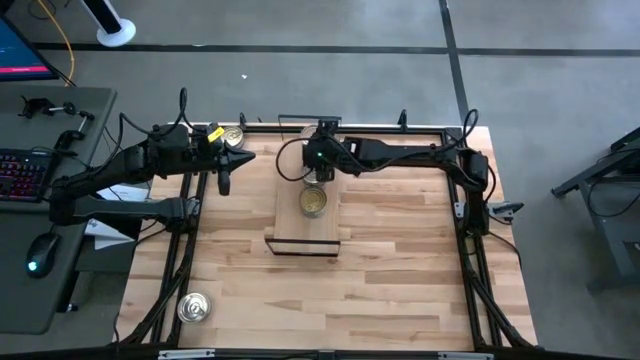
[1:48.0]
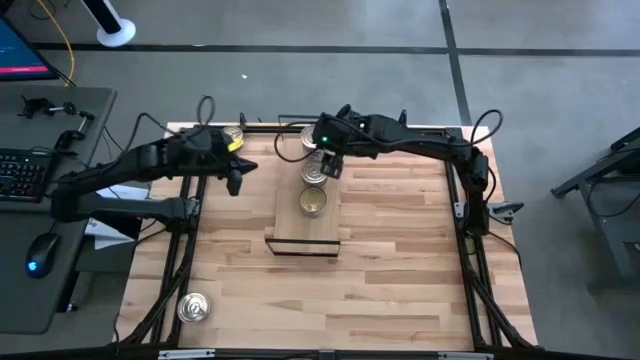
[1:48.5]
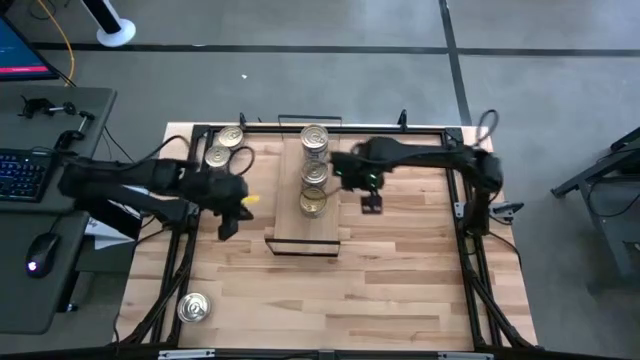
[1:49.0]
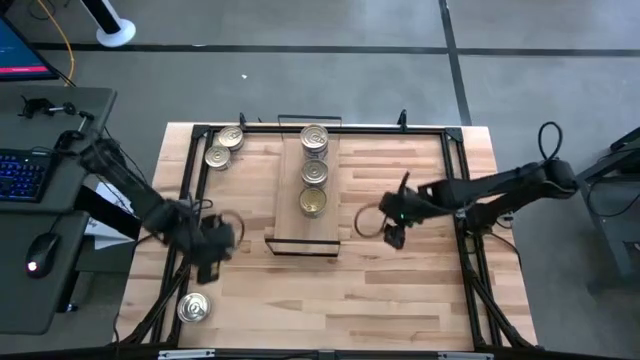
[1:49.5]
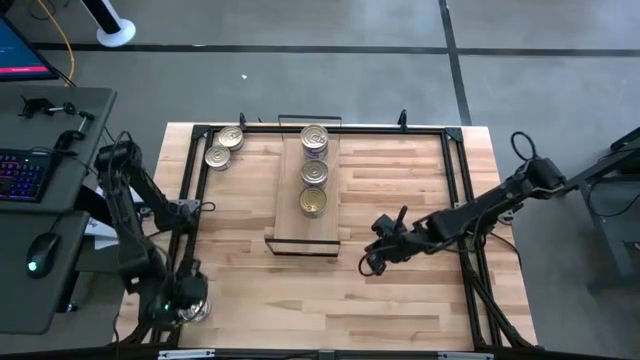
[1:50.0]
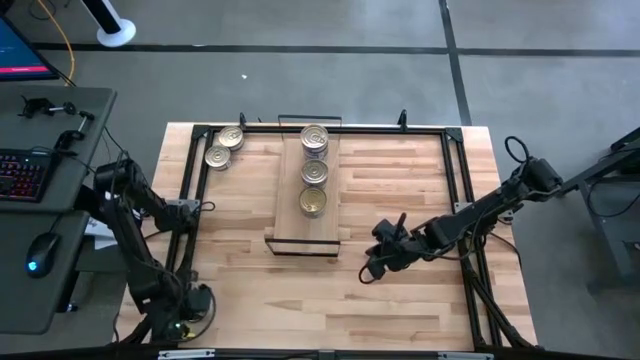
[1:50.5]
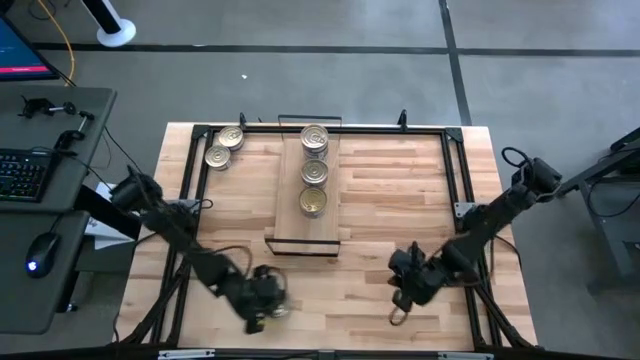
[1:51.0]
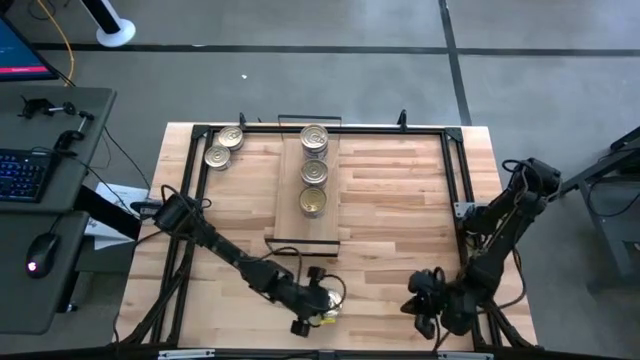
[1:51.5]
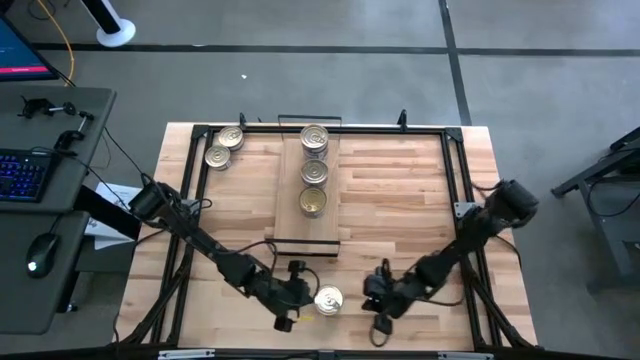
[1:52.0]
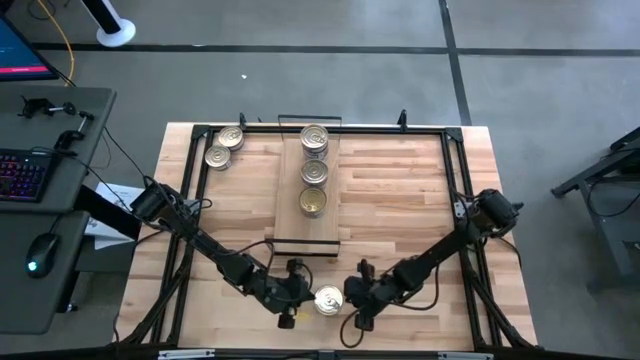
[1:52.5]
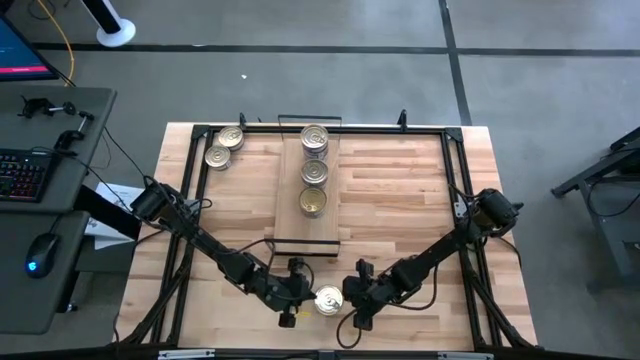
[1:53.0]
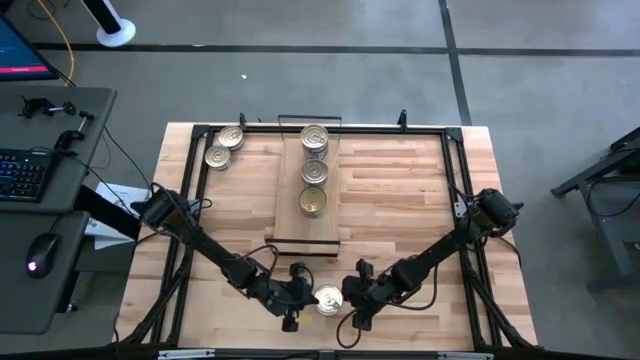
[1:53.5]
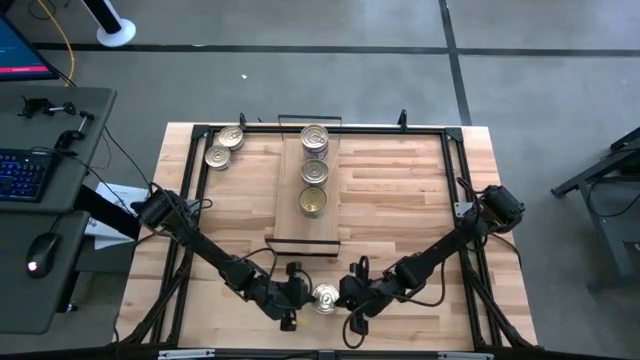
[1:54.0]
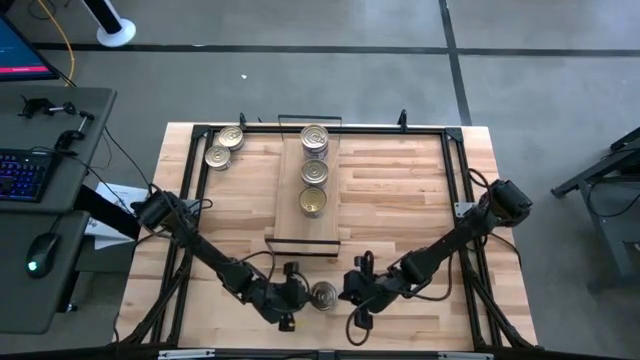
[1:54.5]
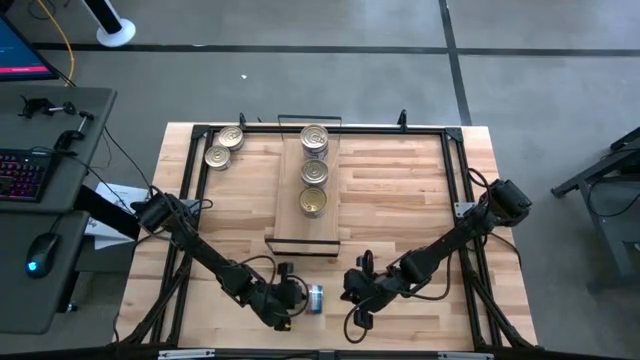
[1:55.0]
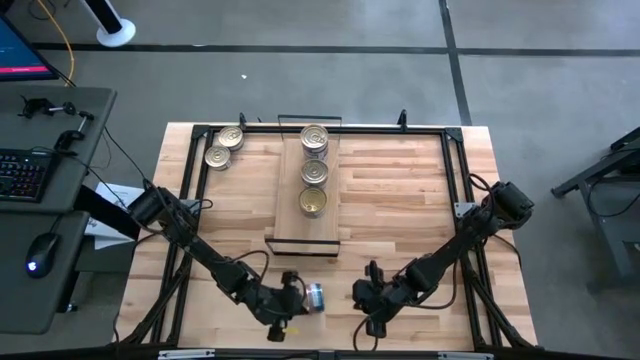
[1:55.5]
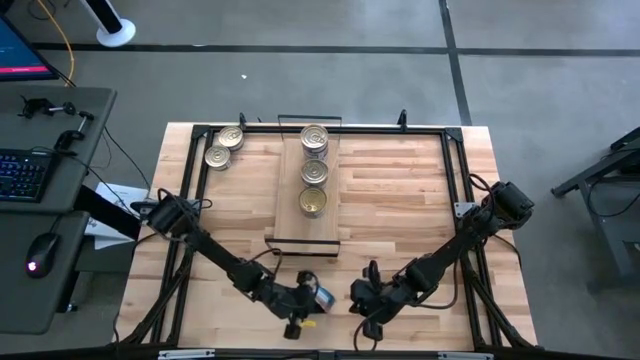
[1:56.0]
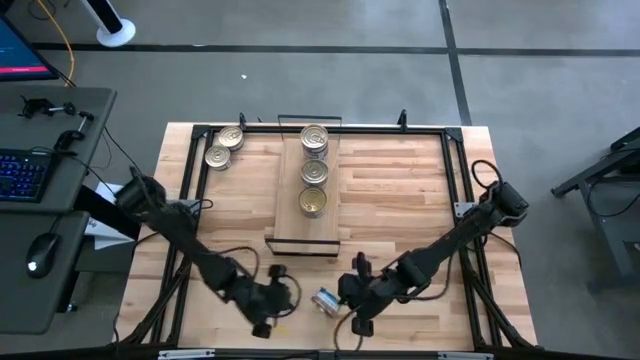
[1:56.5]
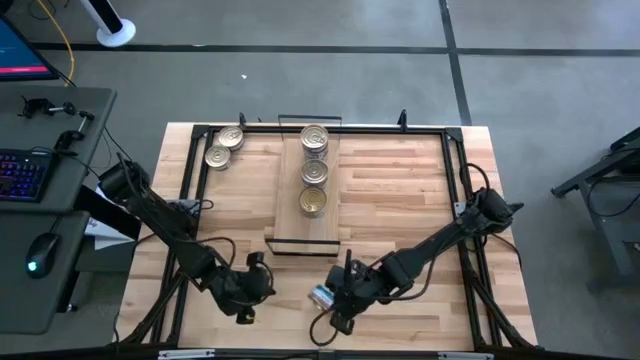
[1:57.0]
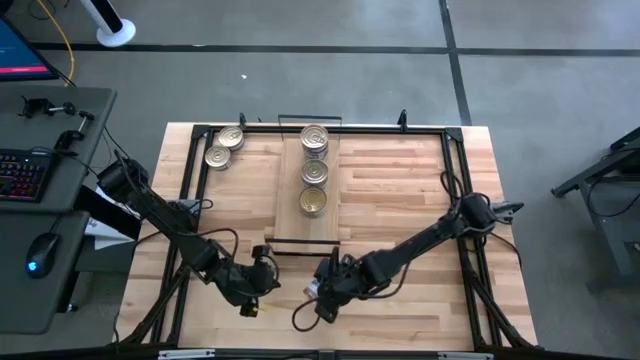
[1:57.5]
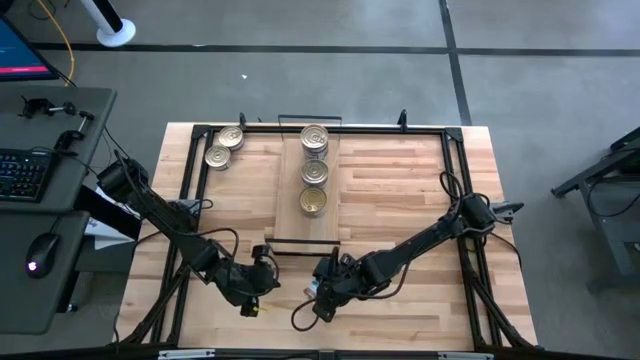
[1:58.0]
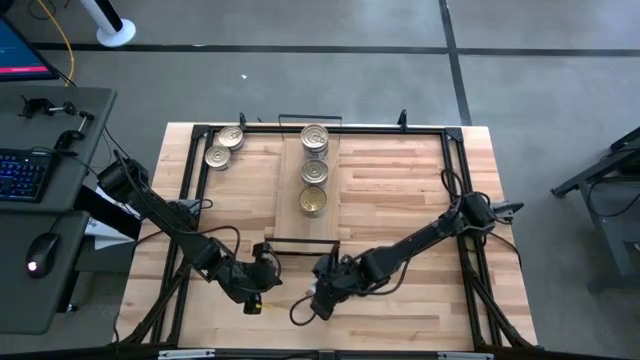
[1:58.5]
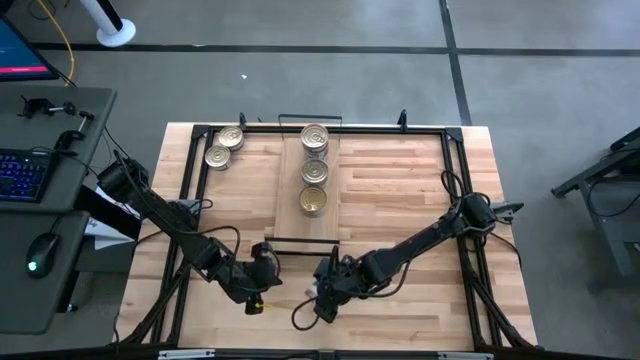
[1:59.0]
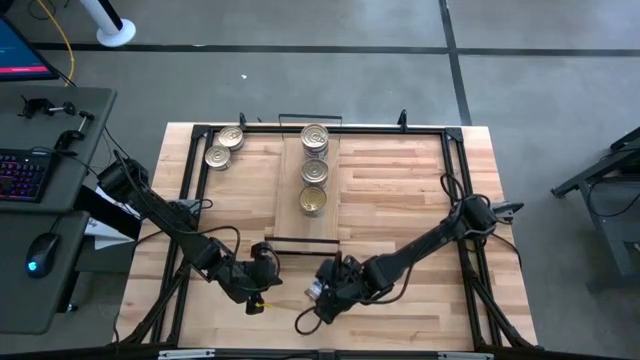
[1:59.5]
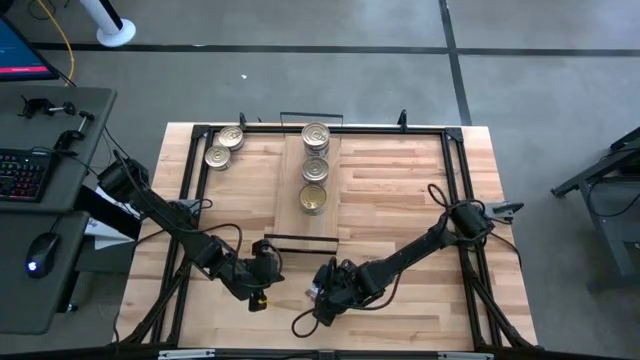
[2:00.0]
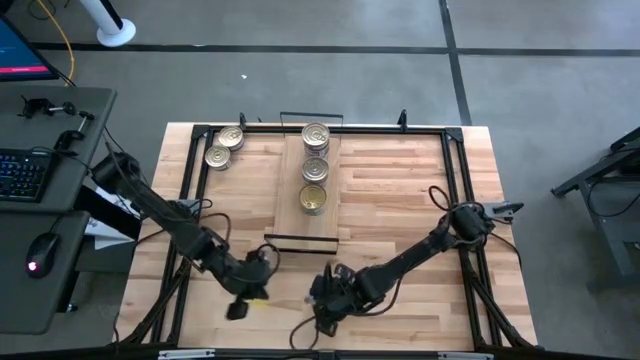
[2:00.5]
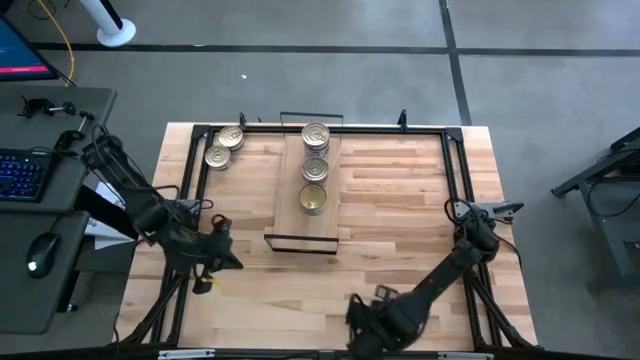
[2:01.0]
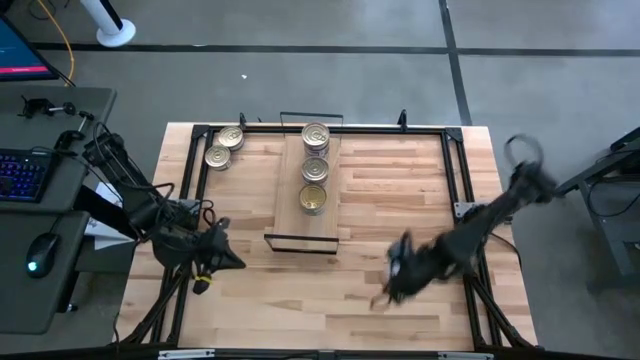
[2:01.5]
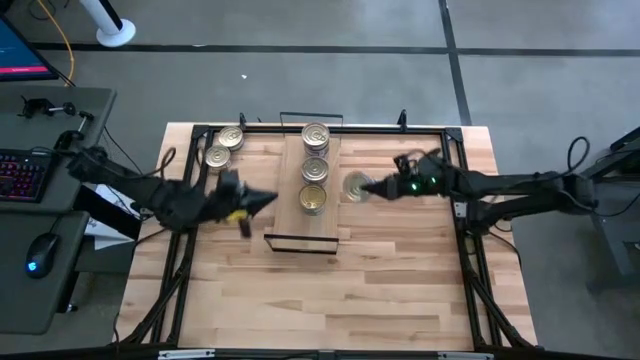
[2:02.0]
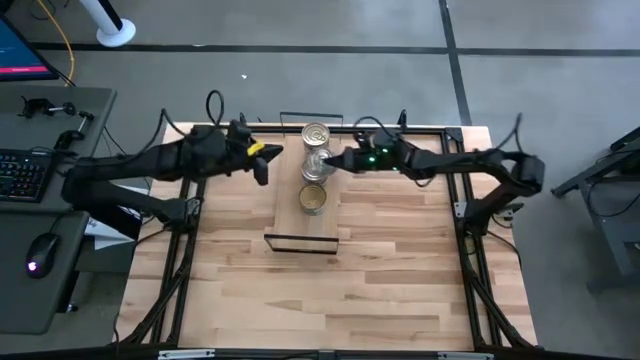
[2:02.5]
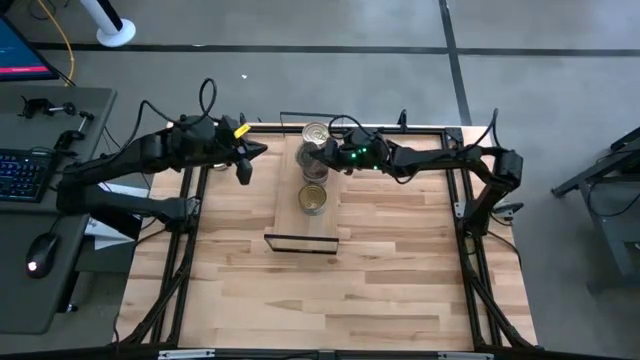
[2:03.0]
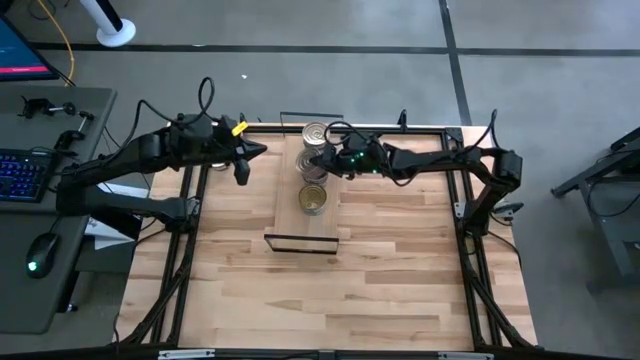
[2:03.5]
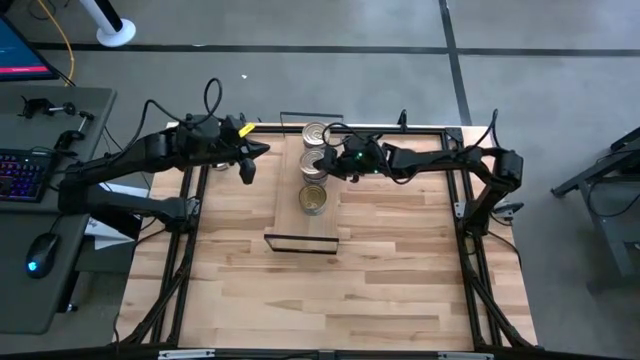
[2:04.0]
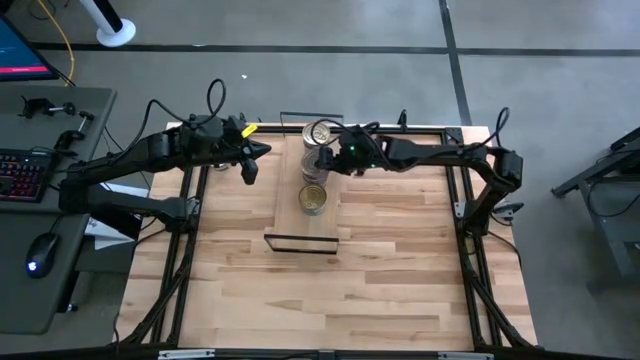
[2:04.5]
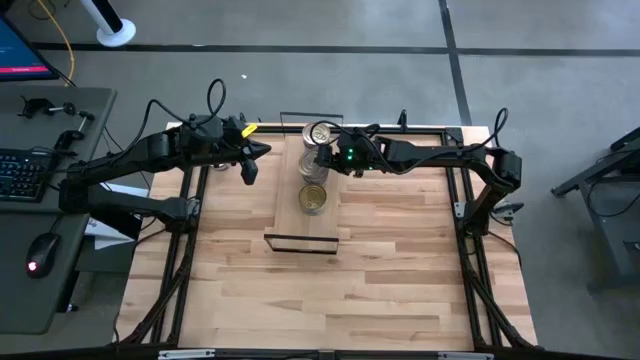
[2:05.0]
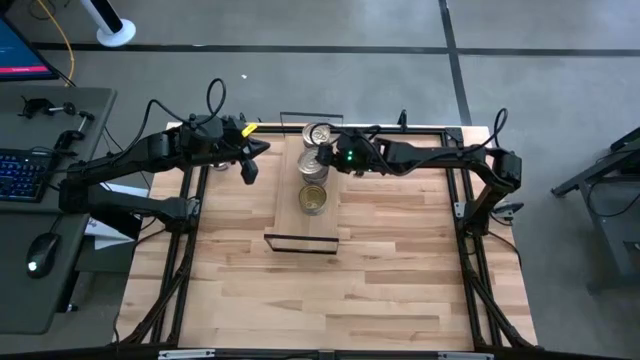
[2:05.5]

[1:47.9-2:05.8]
Task: Stack canned seafood by type on shelf
Stack the blue pink tuna can on top of the other blue pink tuna cans on the shelf

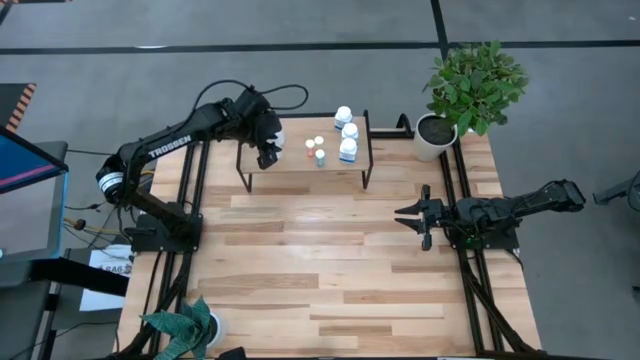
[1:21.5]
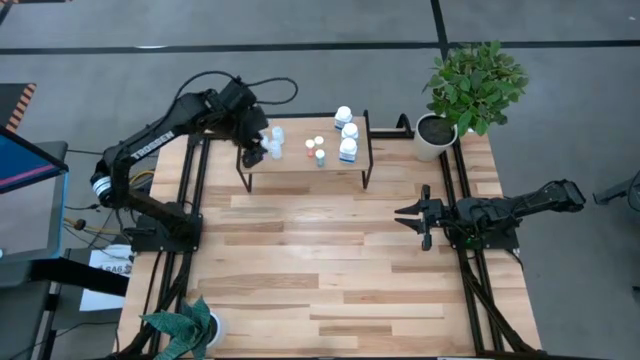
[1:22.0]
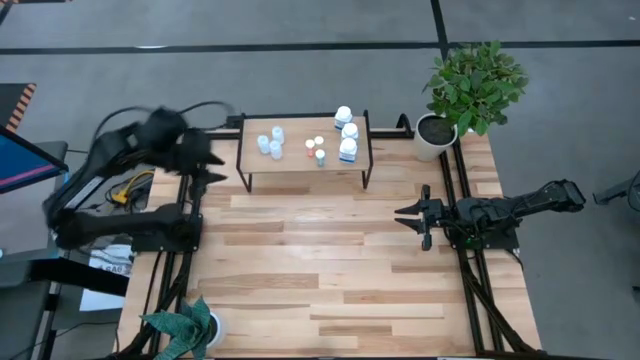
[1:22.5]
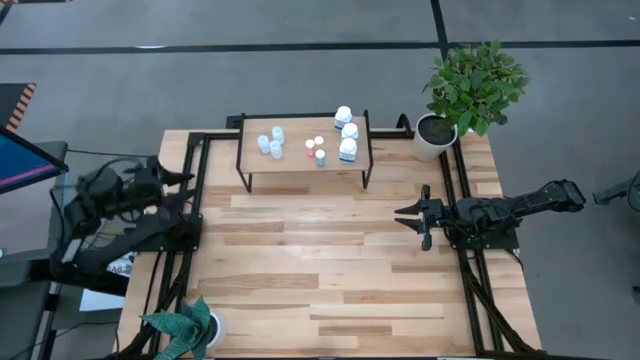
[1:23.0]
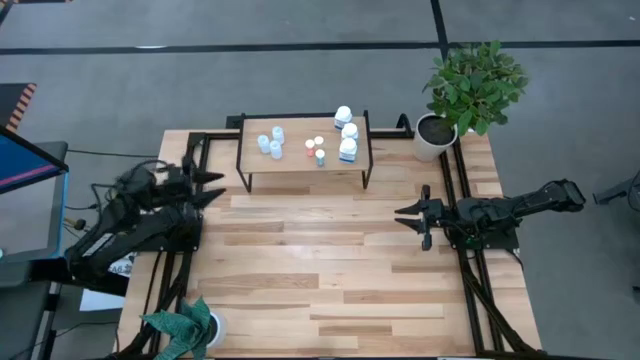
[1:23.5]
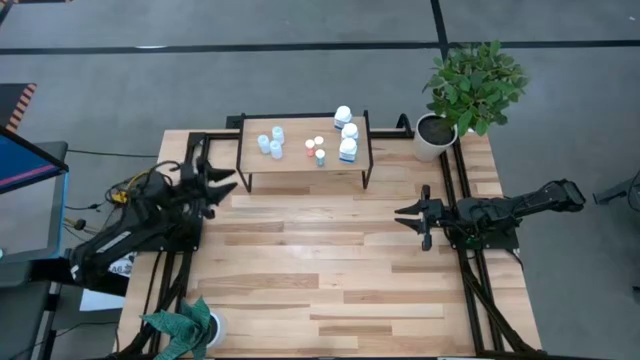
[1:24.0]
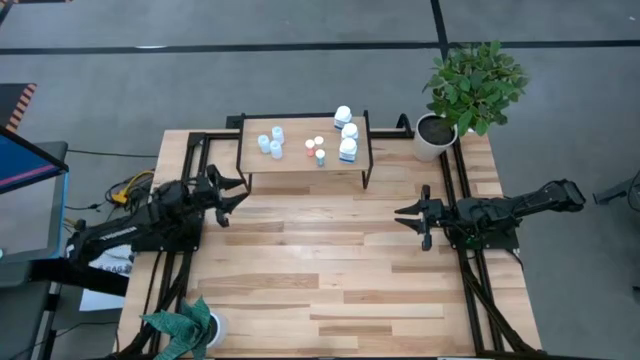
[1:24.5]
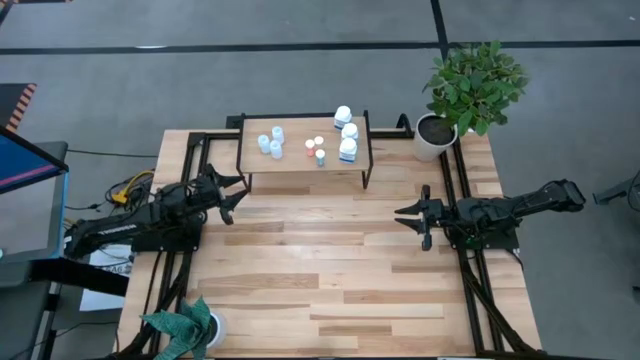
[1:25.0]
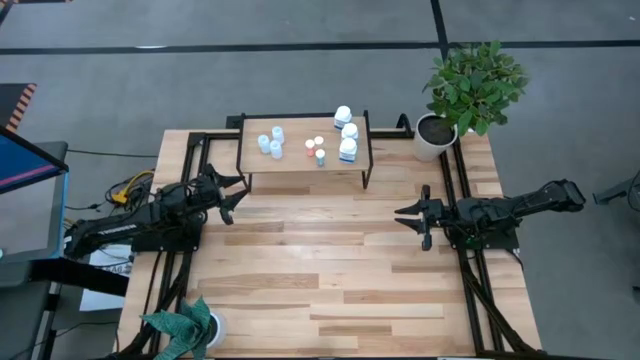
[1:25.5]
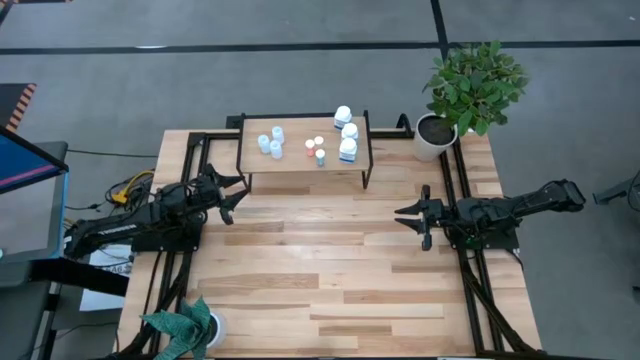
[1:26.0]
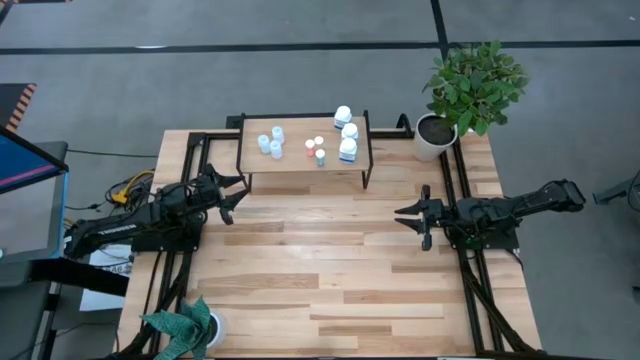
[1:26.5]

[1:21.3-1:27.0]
Task: Pick and place medicine bottles onto shelf by color
Return to Home Position
